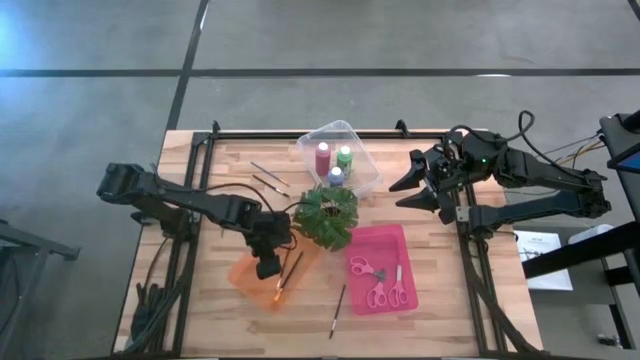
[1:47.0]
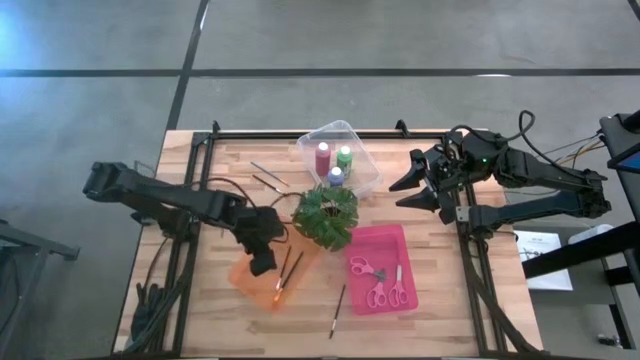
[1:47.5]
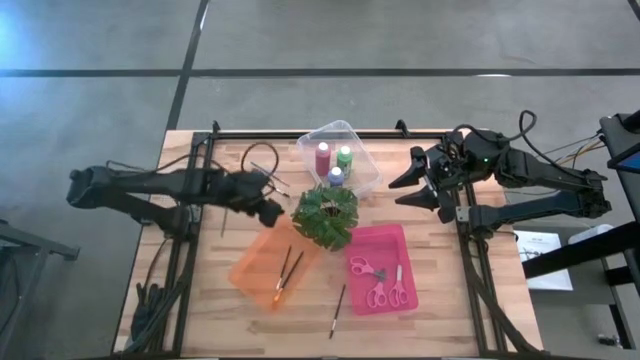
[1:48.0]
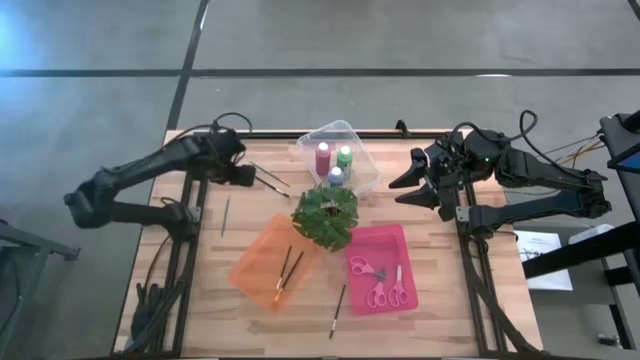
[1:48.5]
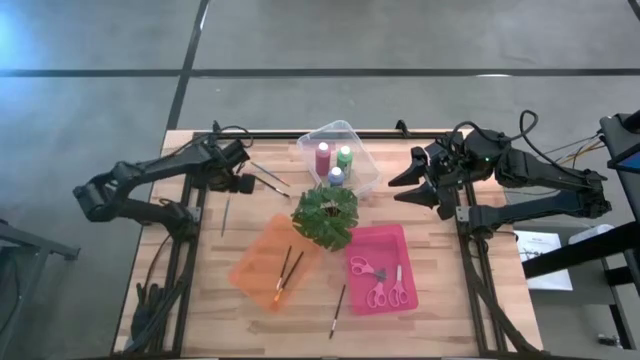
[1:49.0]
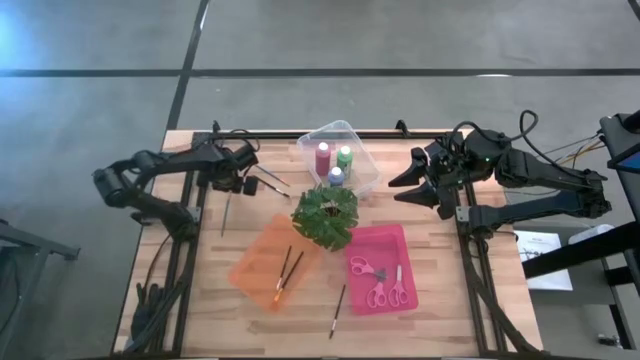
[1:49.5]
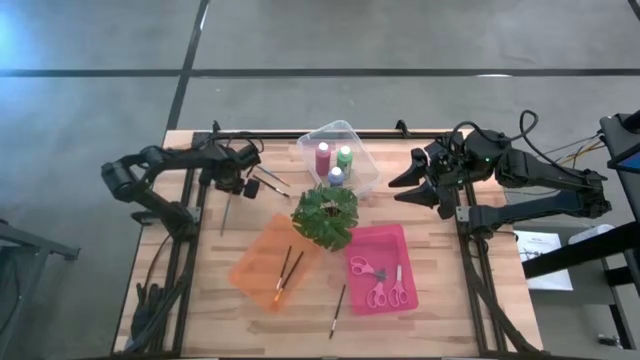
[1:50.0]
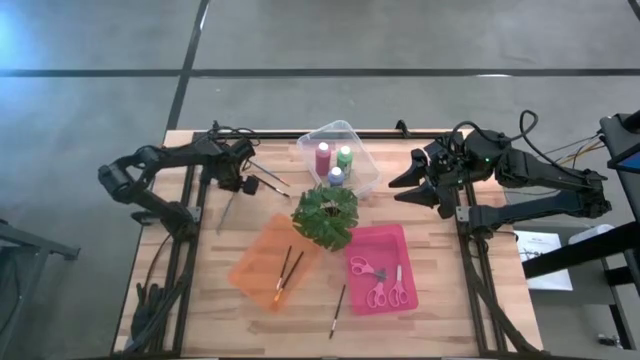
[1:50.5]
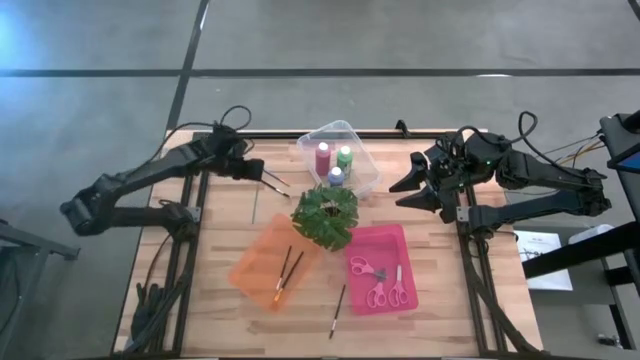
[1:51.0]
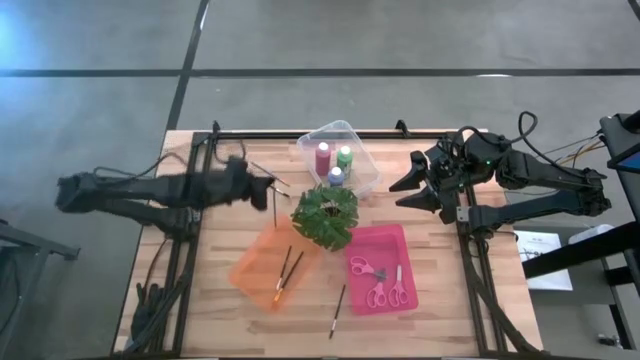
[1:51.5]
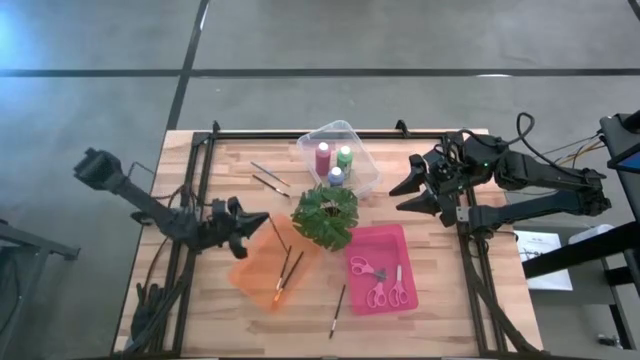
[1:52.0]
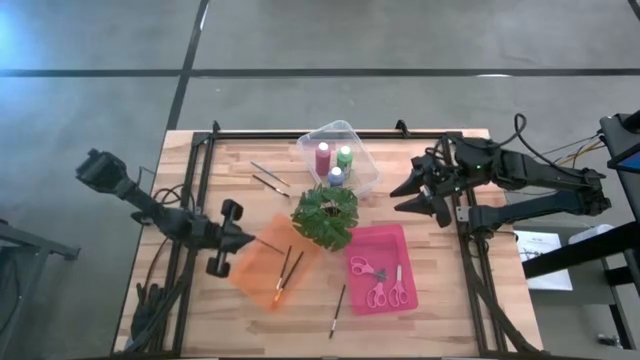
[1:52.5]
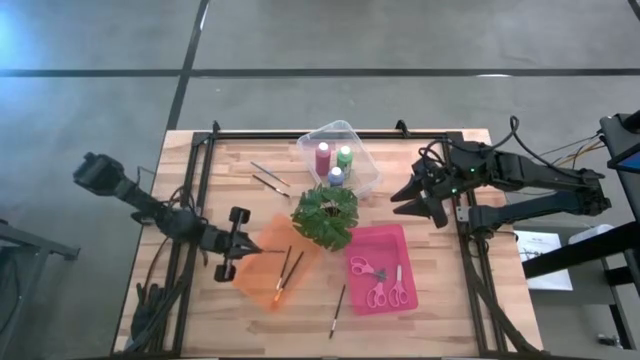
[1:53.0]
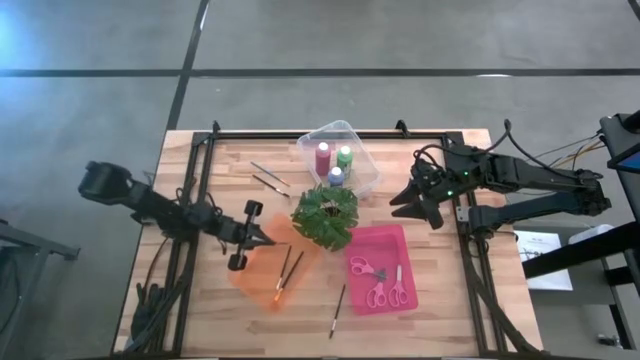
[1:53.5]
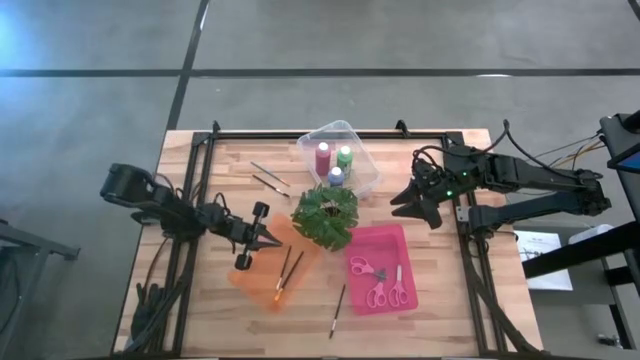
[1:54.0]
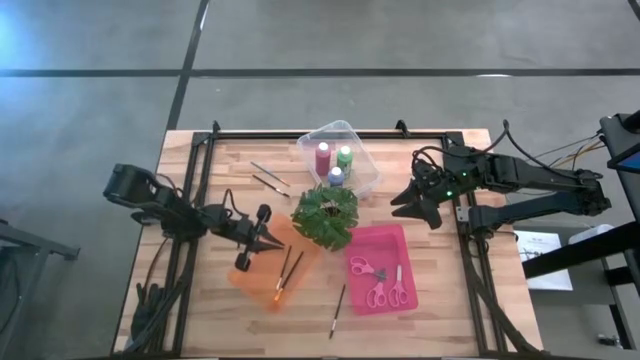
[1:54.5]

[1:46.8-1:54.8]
Task: Pick & Place Paint Supplies
Put the bottom blue paint brush into the orange bin

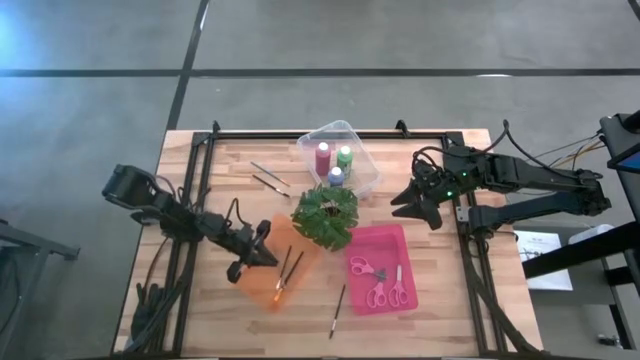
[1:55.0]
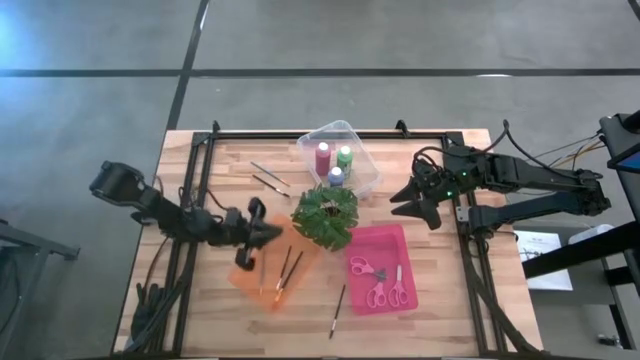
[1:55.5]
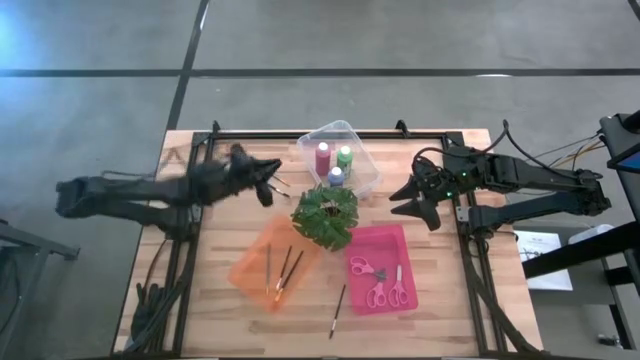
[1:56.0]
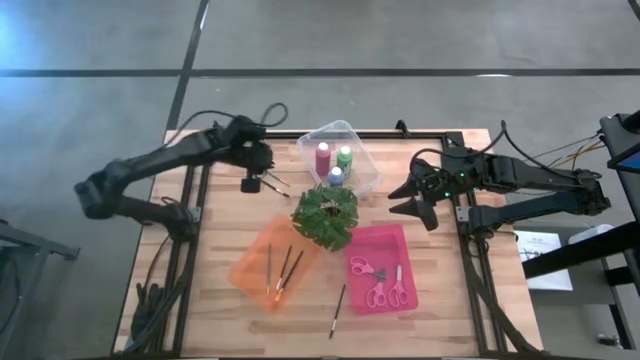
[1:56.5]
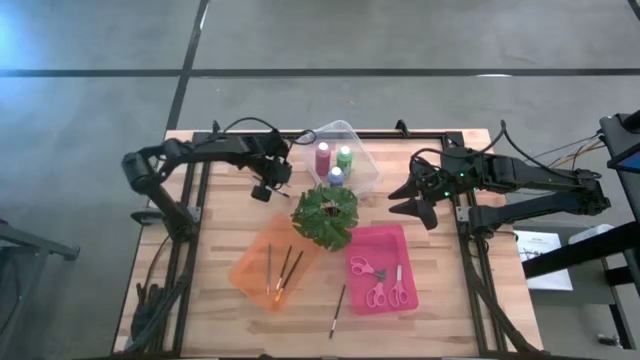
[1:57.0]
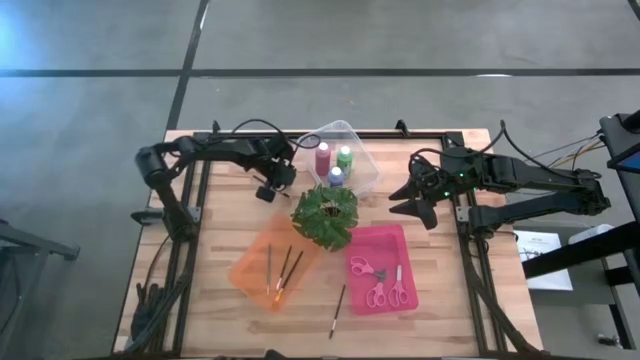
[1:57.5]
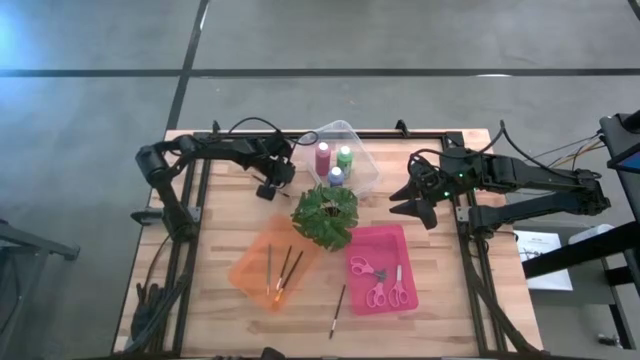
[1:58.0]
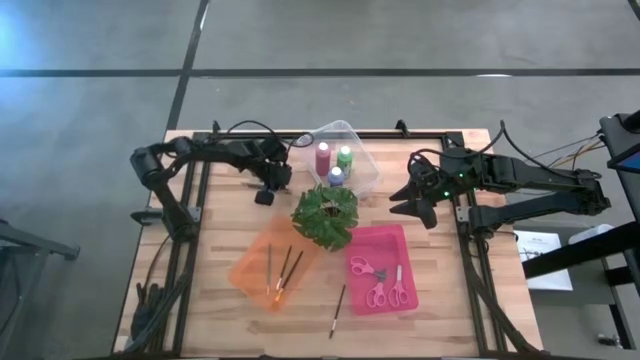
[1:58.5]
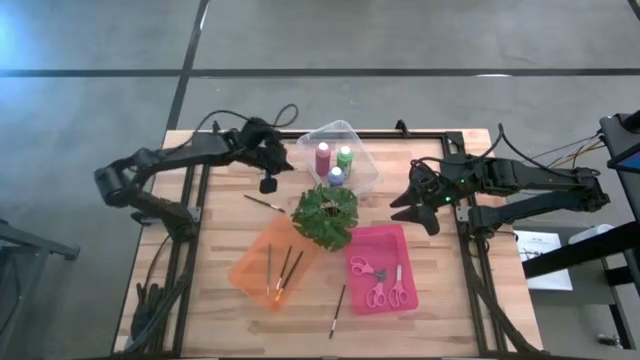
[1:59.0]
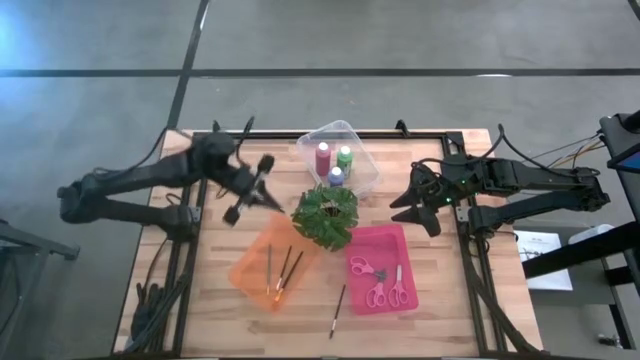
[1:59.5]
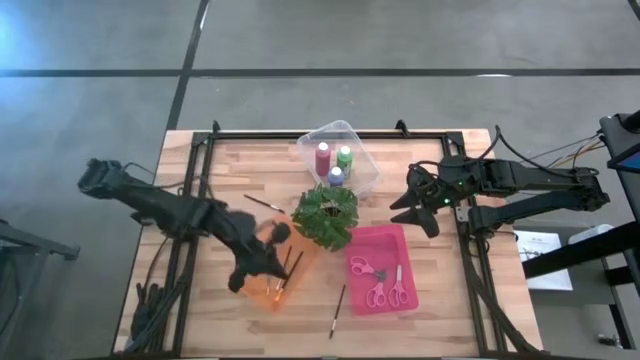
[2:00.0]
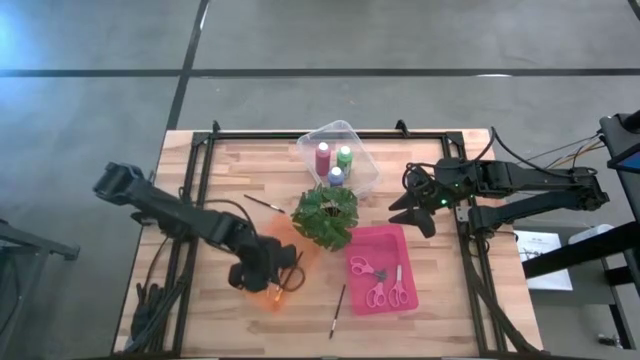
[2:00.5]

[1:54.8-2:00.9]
Put the blue paint brush into the orange bin

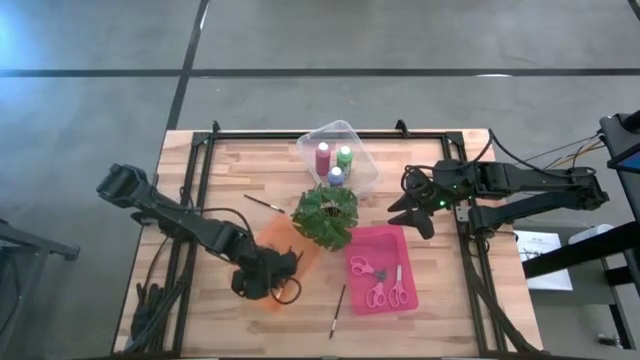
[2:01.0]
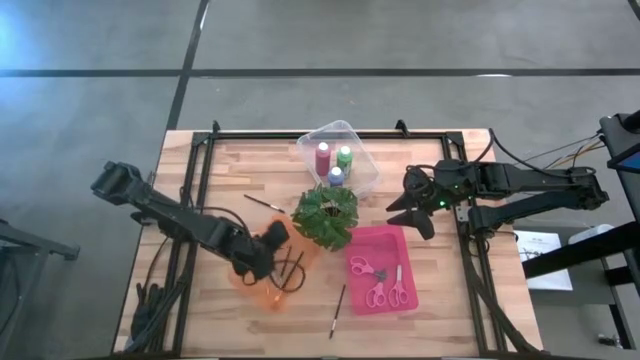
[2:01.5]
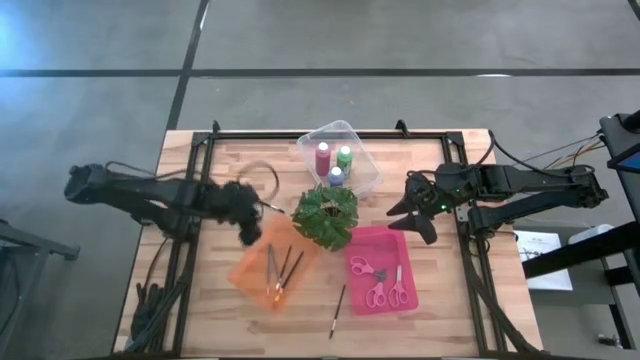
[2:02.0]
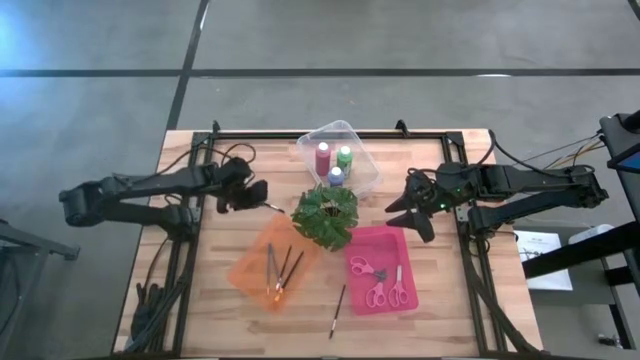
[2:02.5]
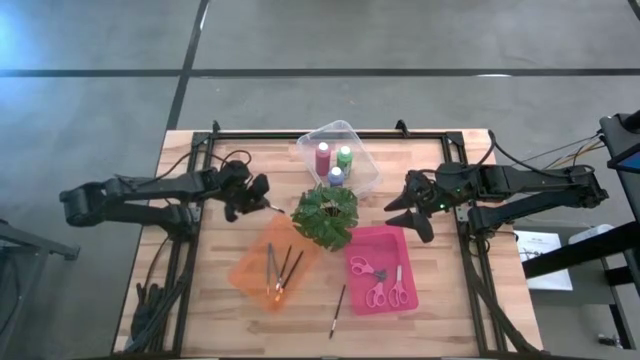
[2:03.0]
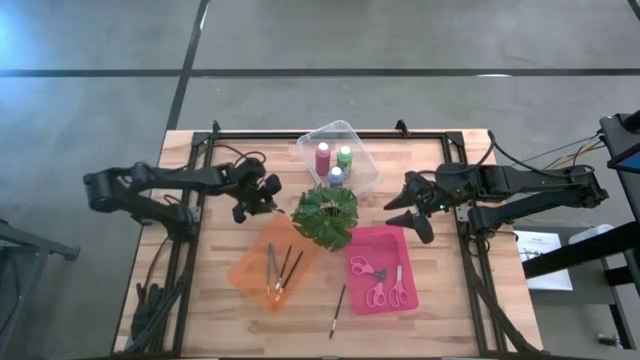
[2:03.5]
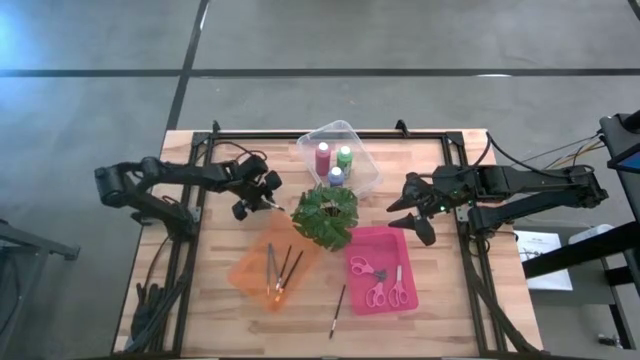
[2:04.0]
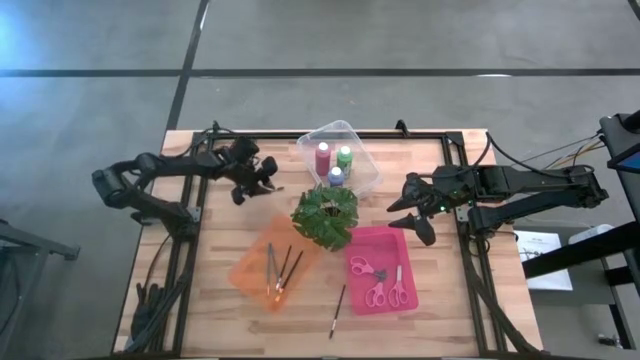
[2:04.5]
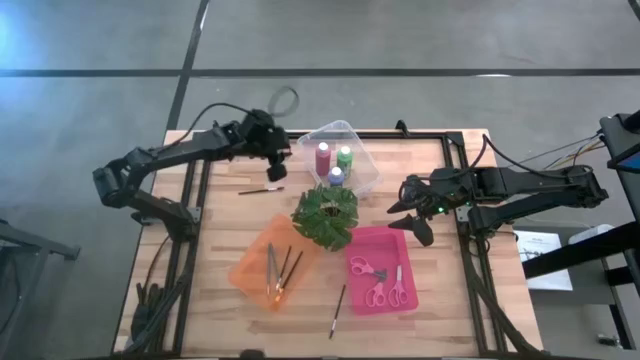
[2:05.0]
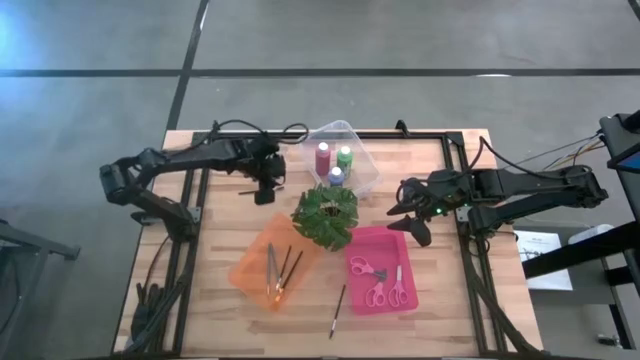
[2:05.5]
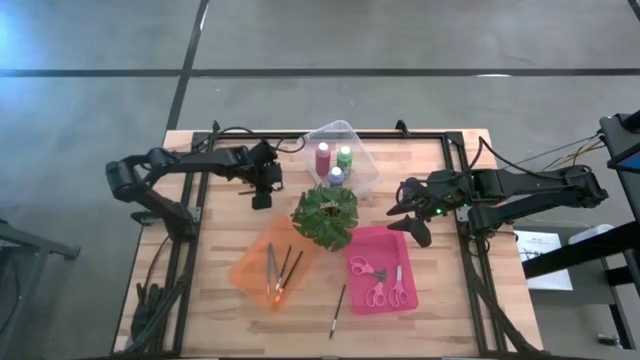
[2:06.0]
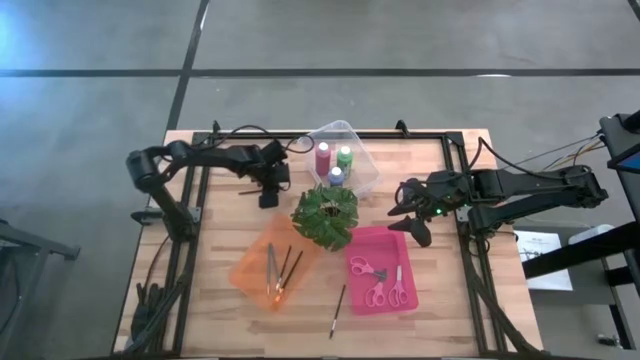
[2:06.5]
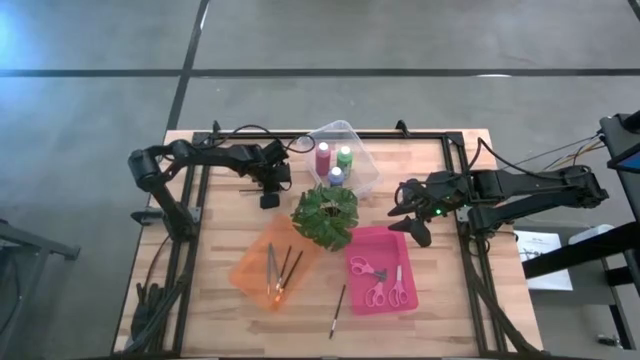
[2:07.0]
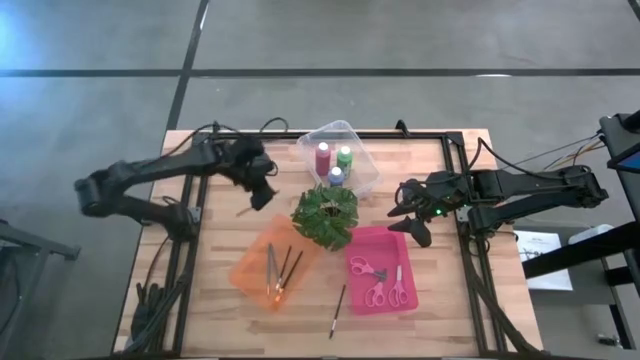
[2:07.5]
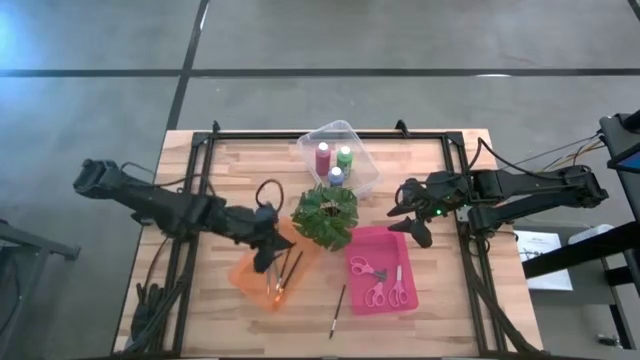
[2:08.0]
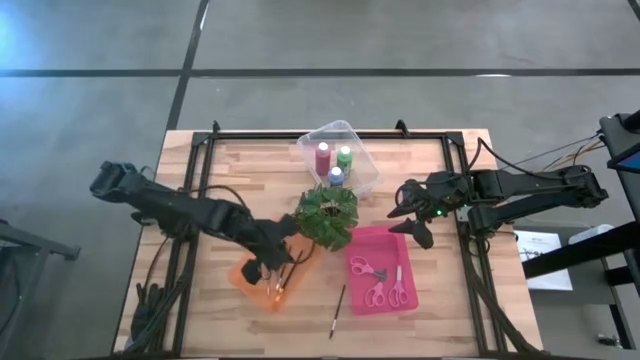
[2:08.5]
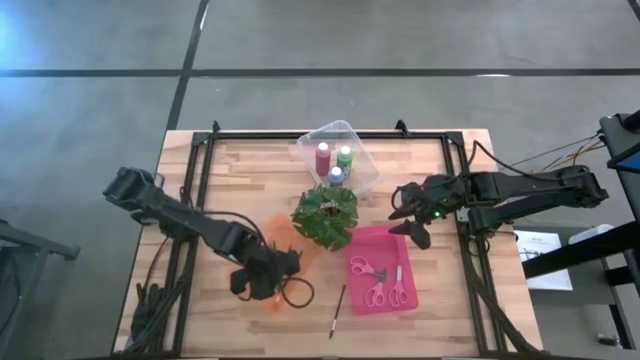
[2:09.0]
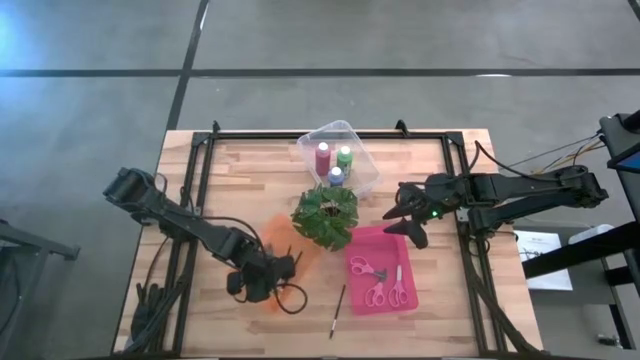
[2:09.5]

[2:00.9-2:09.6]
Put the top black brow brush into the orange bin
